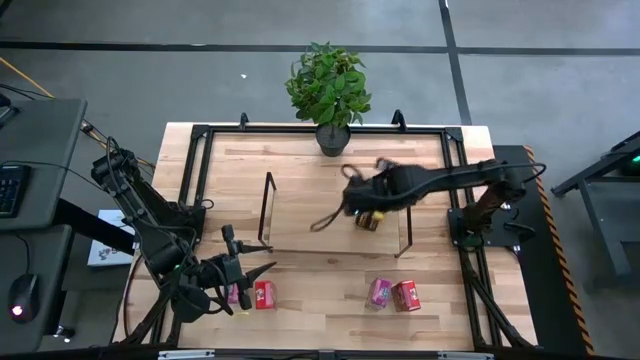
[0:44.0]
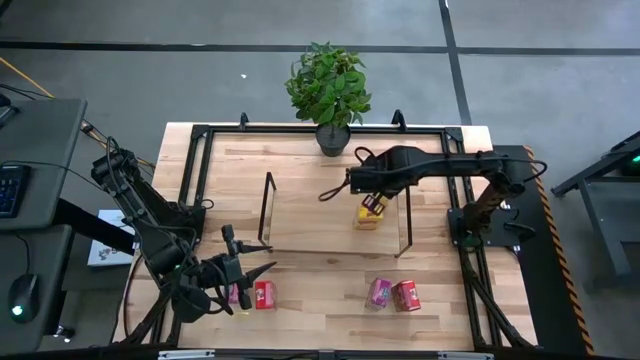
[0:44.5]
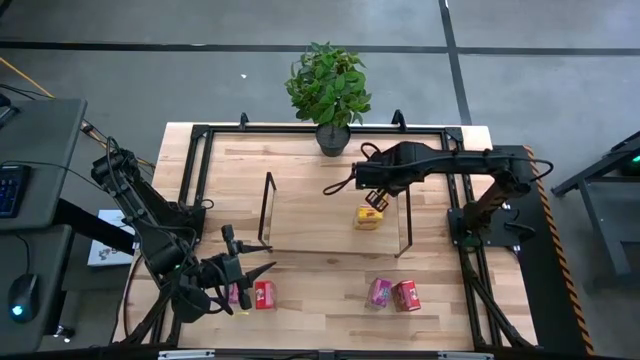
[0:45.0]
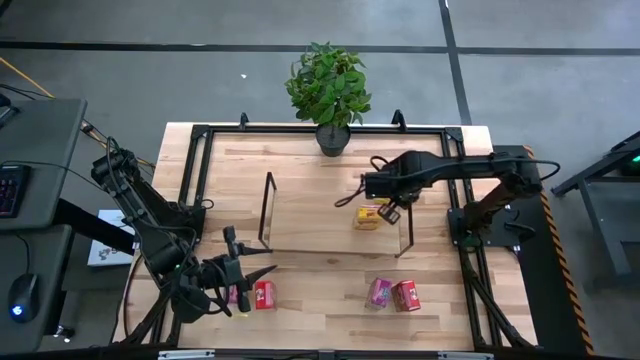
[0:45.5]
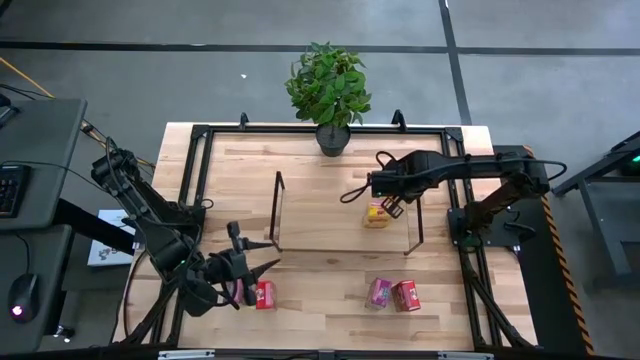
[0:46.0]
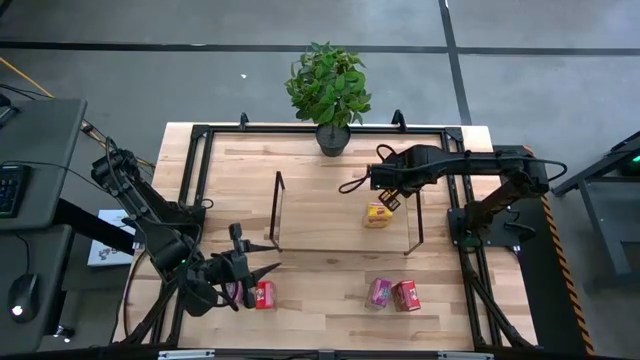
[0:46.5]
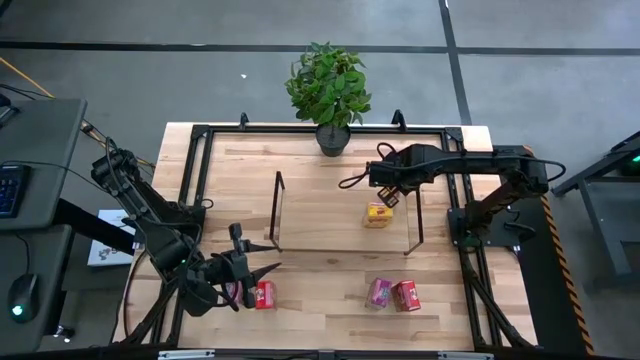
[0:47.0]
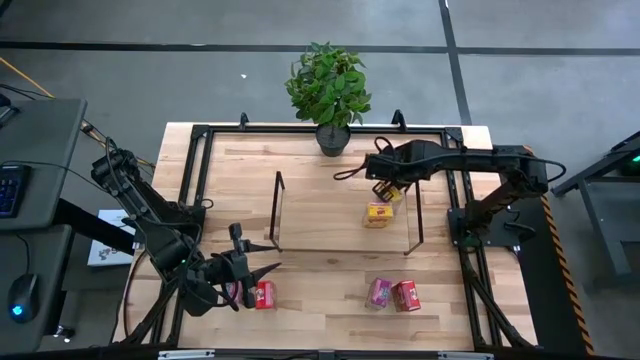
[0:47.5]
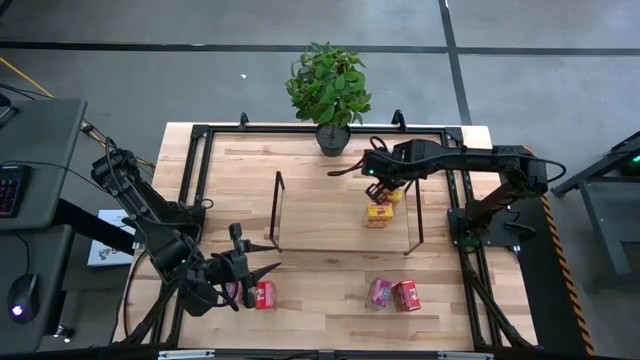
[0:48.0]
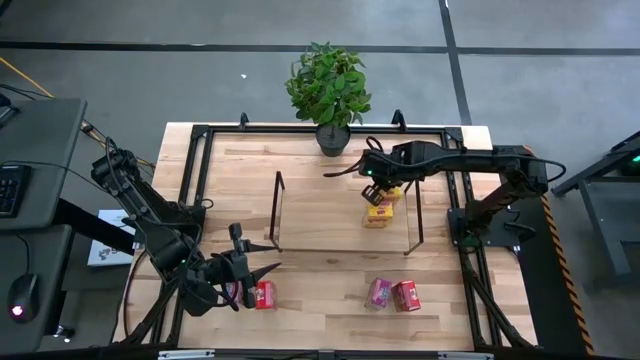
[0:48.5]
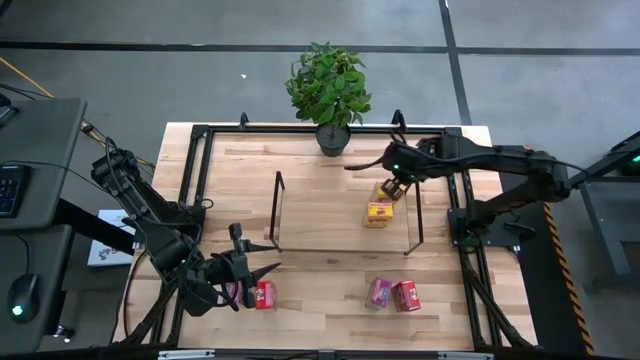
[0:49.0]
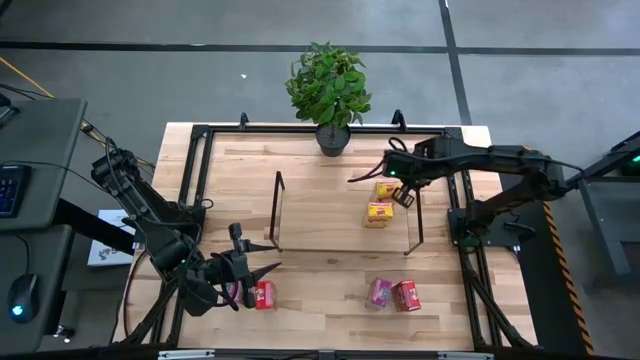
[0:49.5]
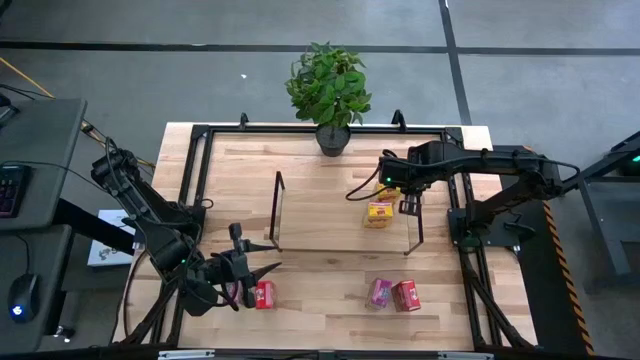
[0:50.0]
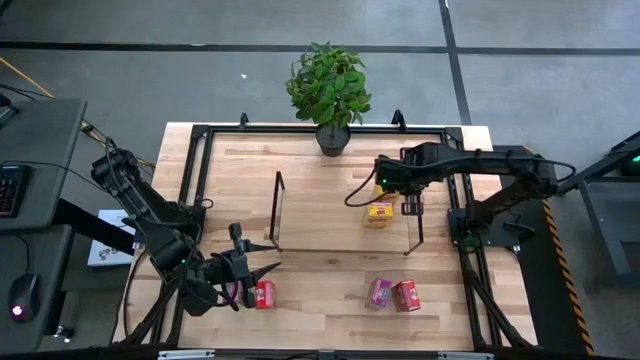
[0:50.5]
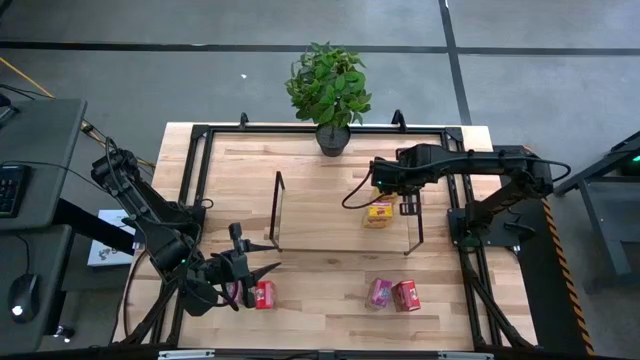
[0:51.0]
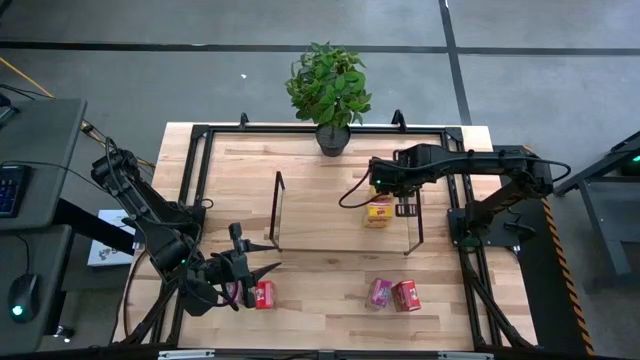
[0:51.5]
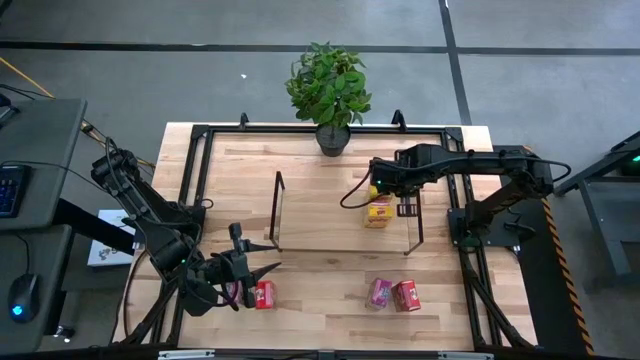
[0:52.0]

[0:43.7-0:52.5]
Task: Stack cereal on shelf
Adjust the yellow cereal box on the shelf

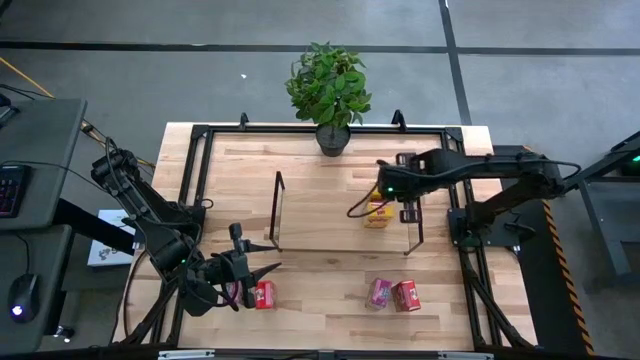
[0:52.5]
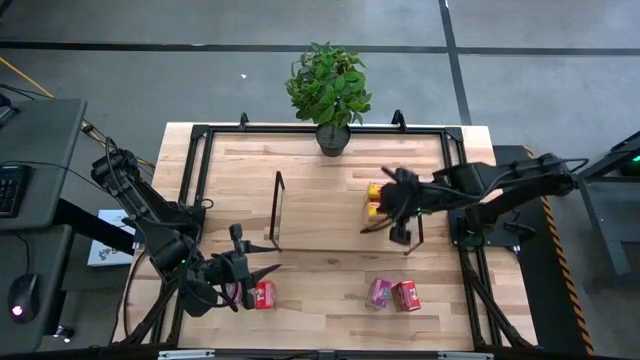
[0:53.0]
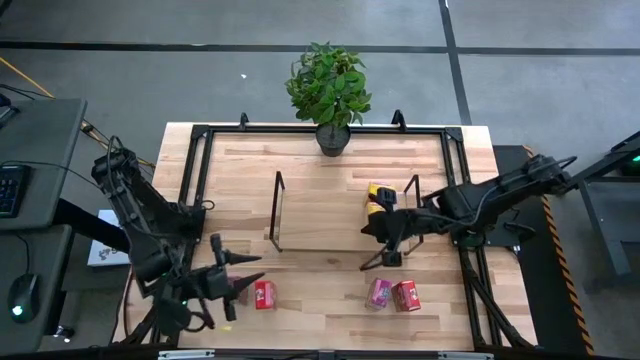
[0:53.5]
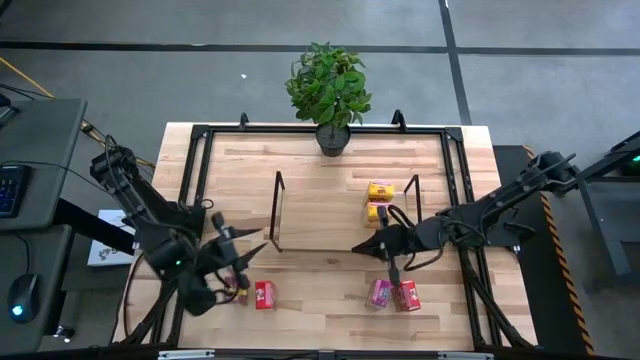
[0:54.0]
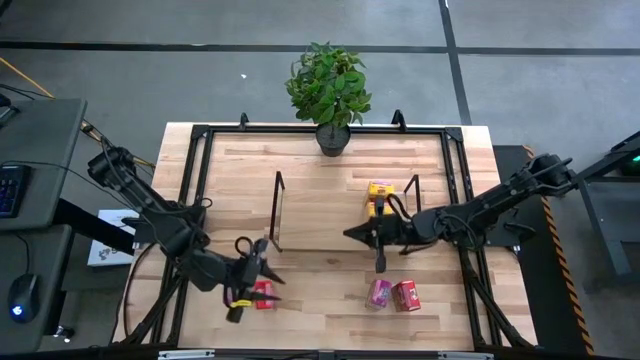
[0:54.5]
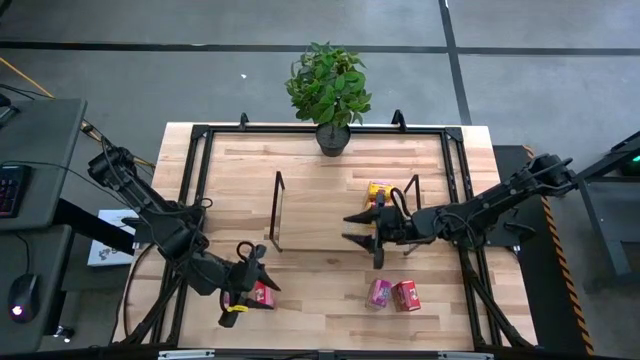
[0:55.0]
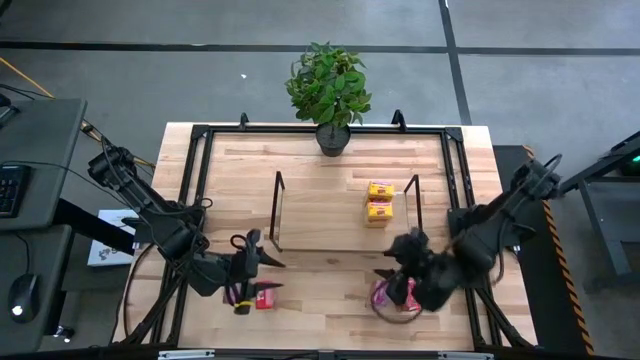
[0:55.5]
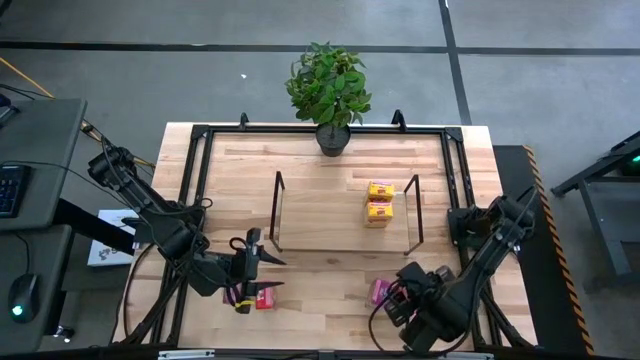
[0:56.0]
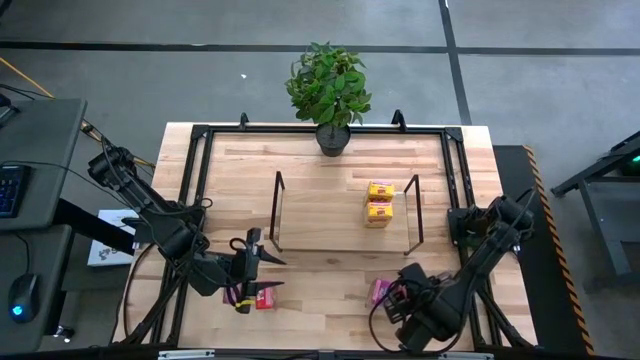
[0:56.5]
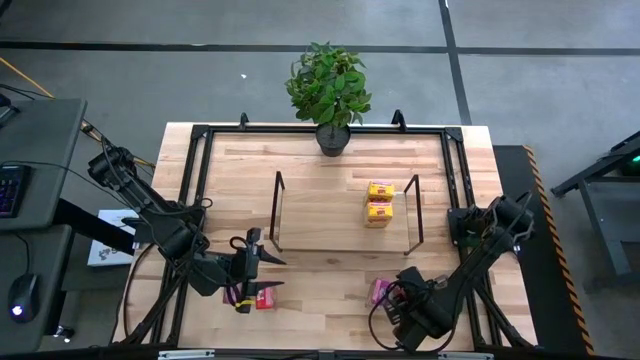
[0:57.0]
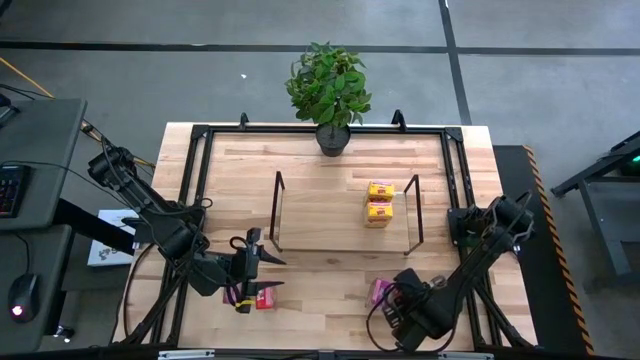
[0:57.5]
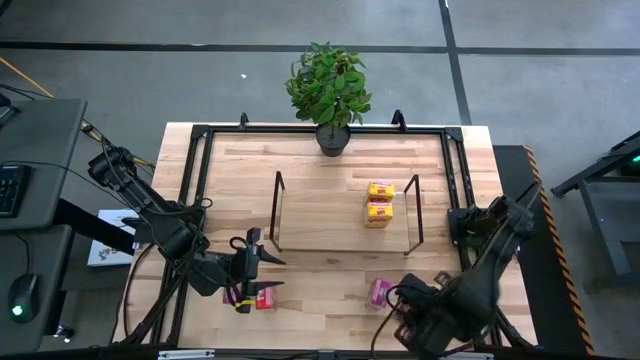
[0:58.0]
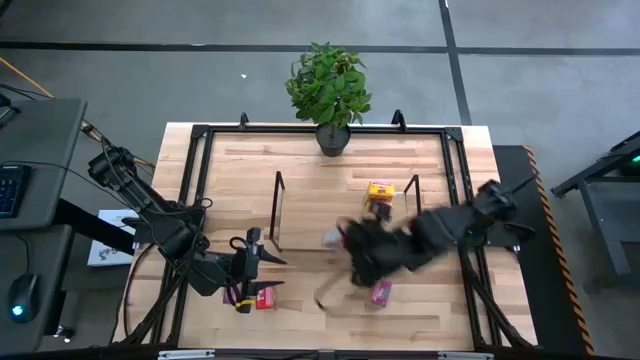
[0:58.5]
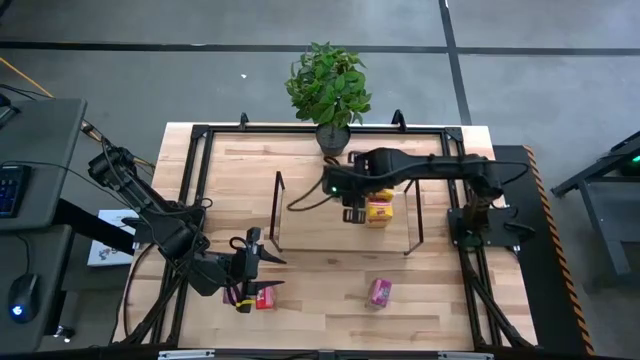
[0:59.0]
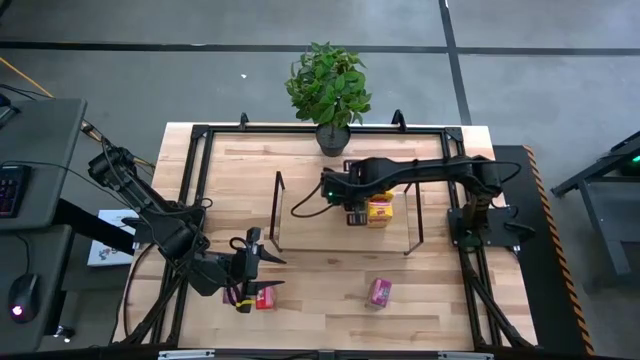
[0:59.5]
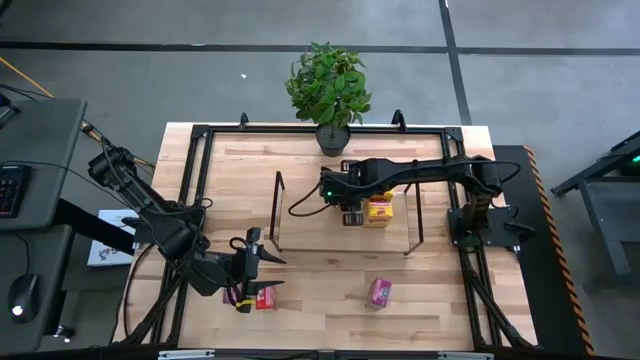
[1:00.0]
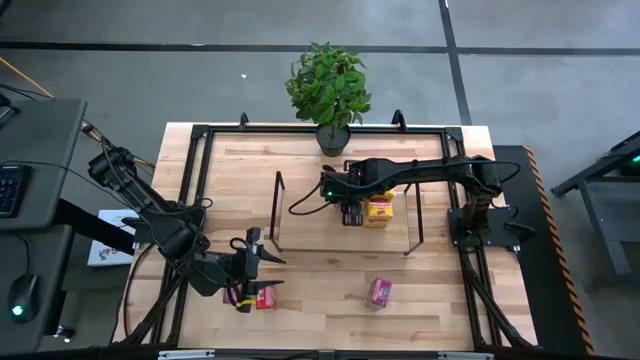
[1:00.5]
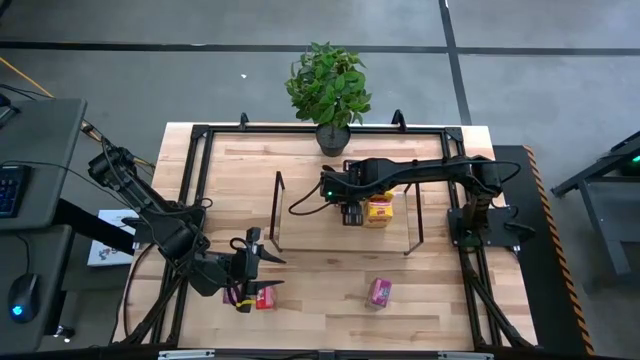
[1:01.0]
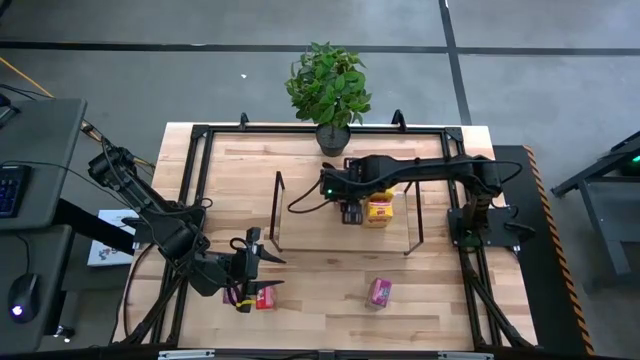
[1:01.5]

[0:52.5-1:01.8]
Put the right red cereal box on the shelf

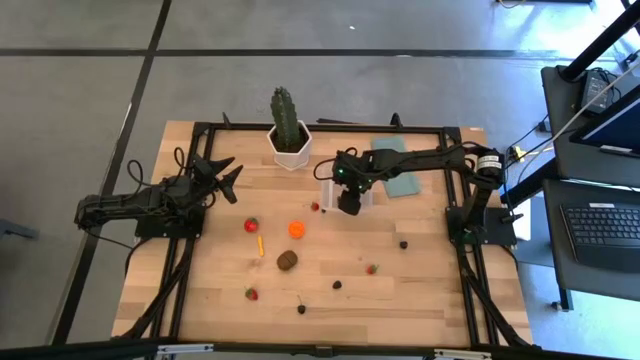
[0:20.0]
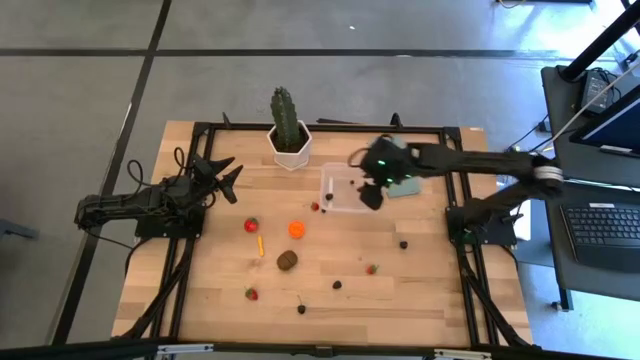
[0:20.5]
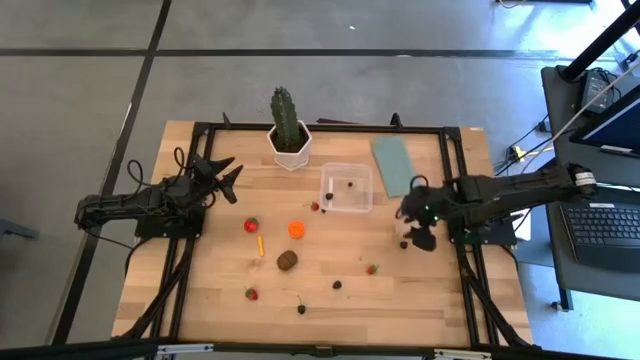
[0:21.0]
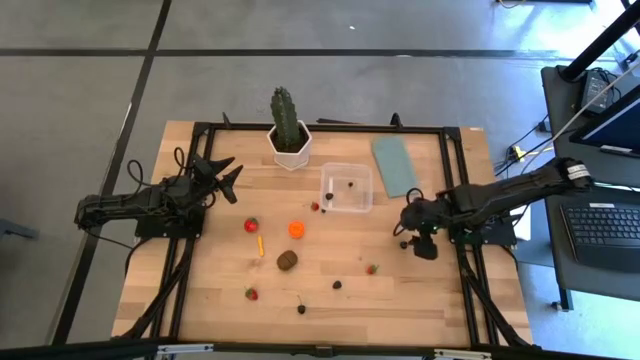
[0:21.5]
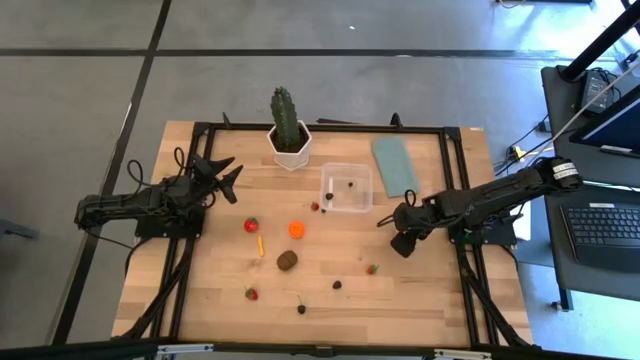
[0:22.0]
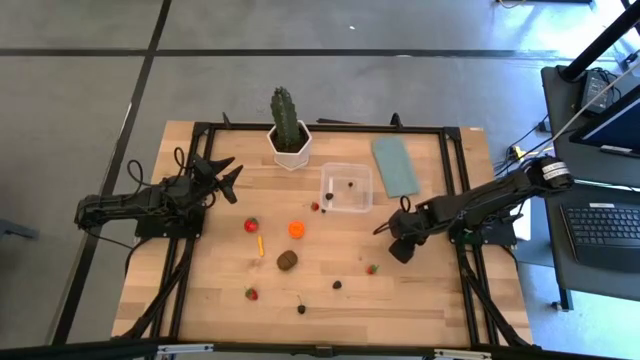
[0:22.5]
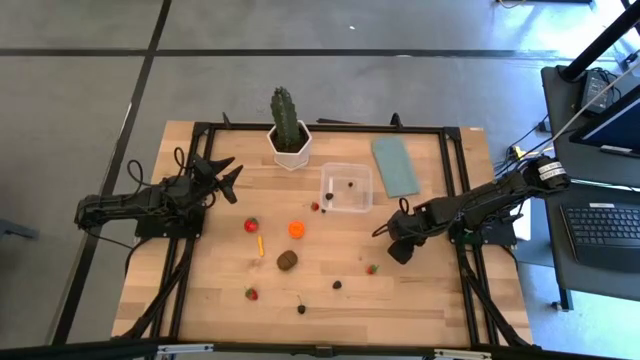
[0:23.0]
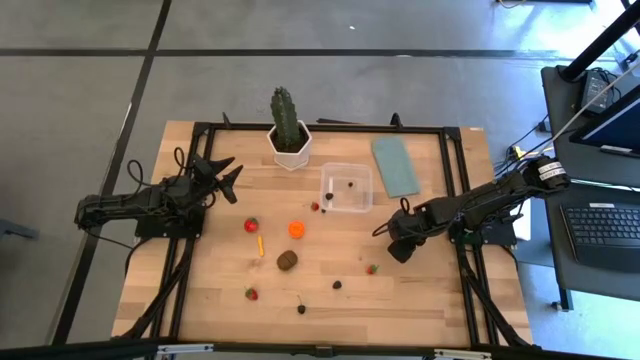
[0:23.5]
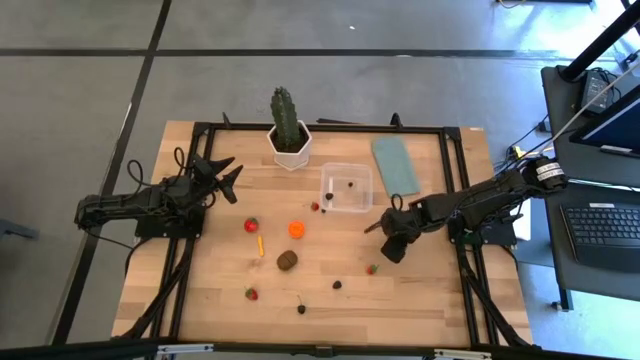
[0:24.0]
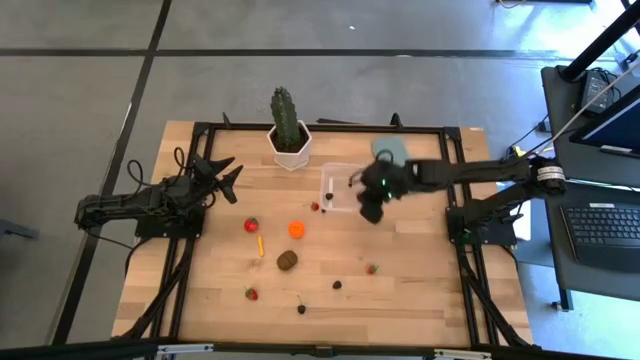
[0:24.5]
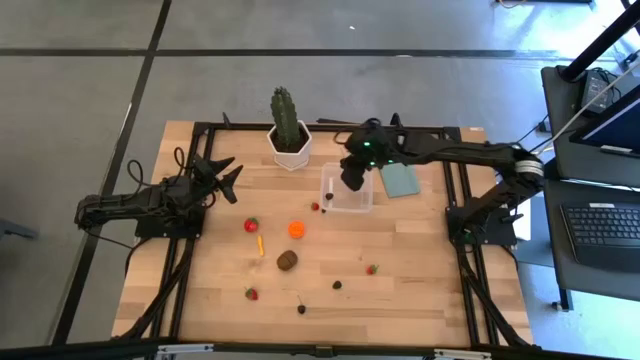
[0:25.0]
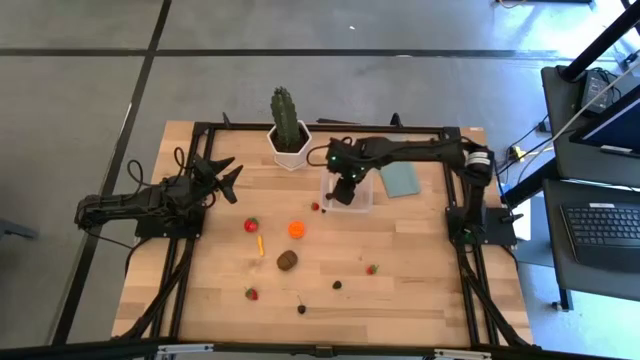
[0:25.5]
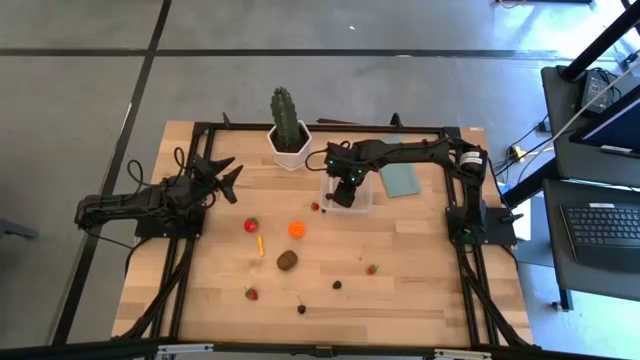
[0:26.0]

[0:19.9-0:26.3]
Task: Pick and placing Produce into tupperware
Put the top cherry into the transparent bin
